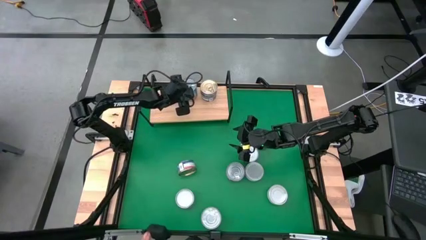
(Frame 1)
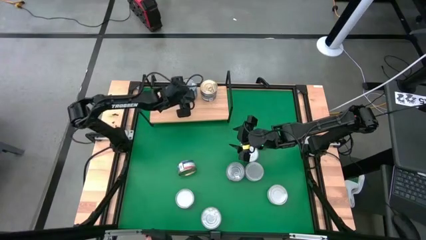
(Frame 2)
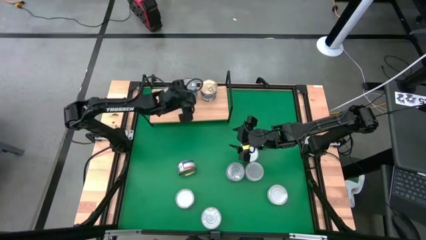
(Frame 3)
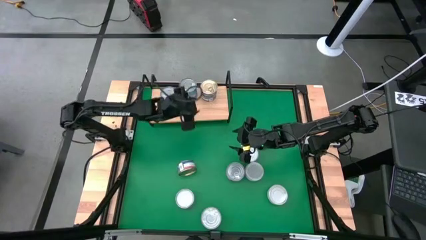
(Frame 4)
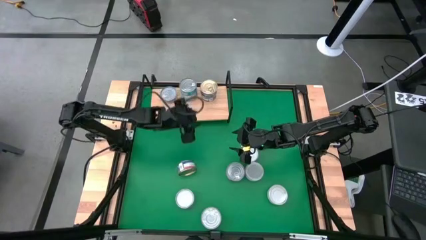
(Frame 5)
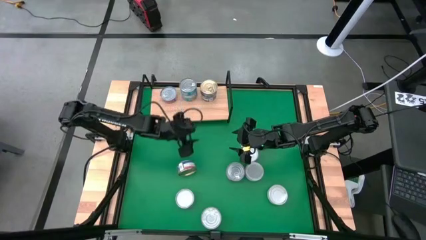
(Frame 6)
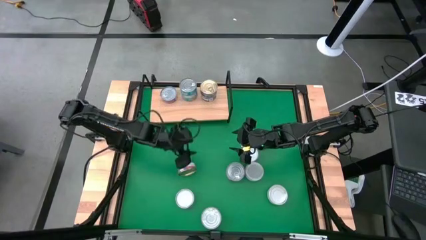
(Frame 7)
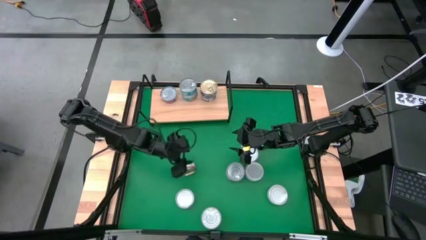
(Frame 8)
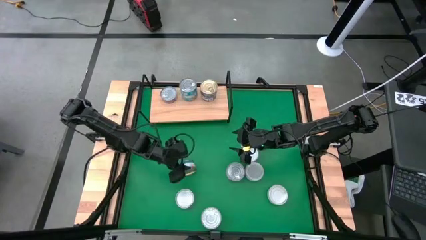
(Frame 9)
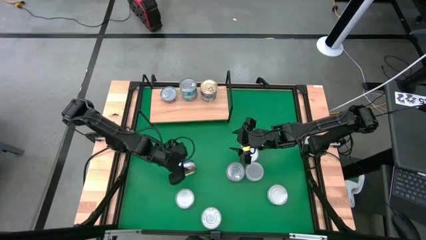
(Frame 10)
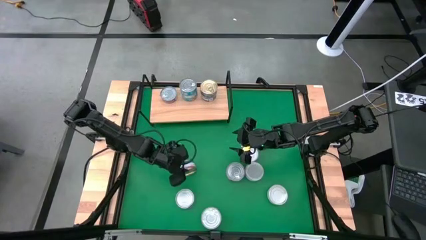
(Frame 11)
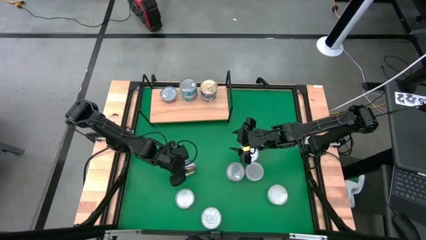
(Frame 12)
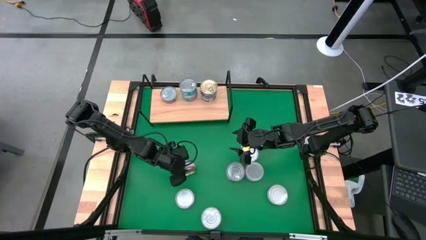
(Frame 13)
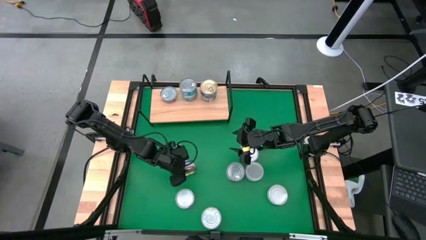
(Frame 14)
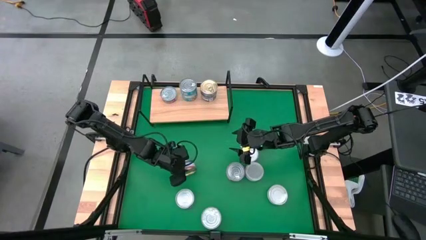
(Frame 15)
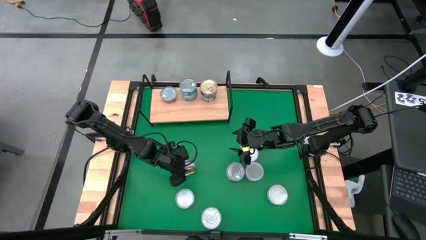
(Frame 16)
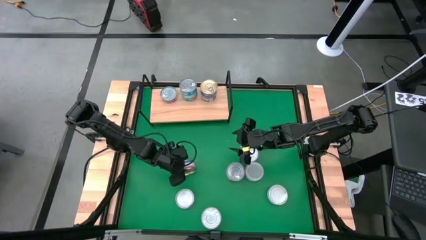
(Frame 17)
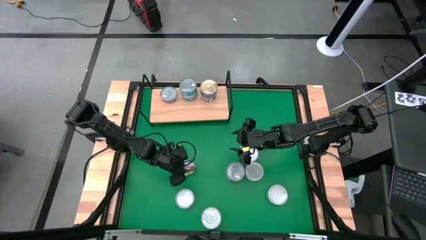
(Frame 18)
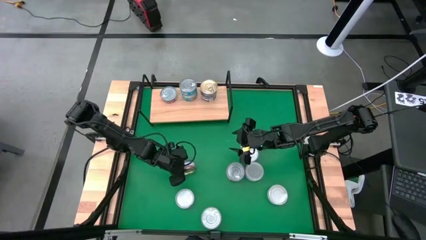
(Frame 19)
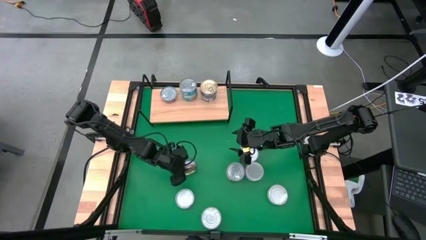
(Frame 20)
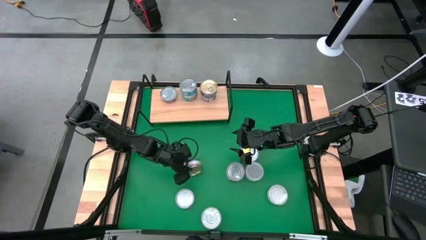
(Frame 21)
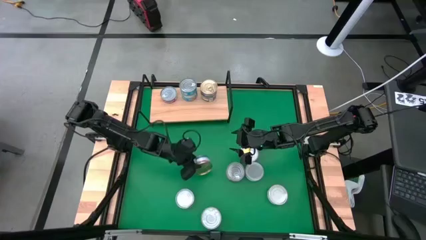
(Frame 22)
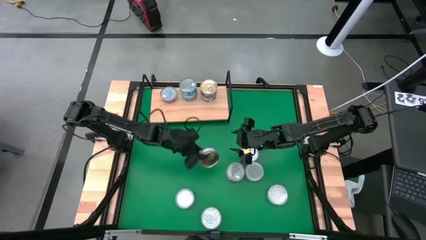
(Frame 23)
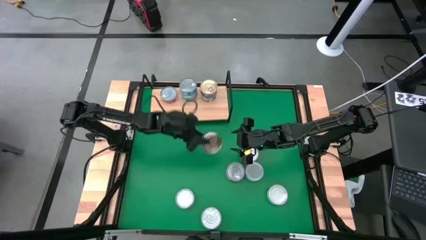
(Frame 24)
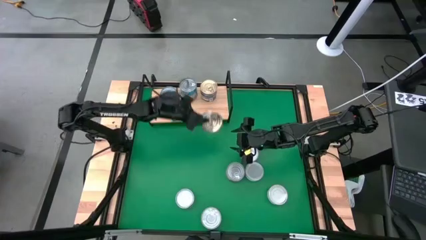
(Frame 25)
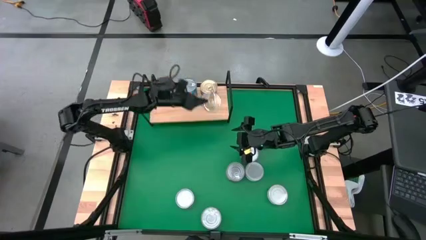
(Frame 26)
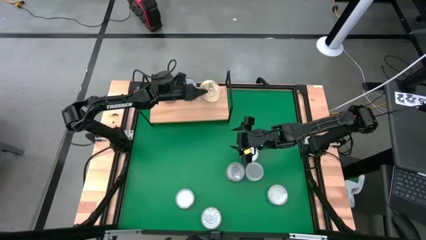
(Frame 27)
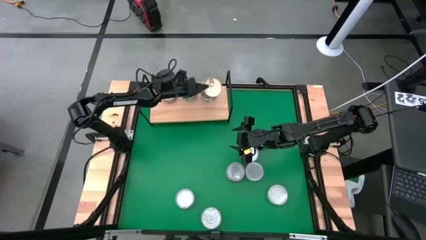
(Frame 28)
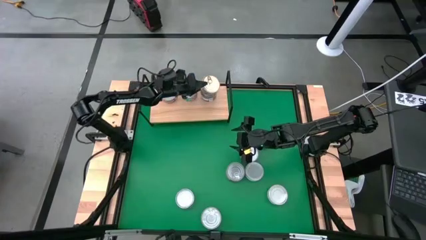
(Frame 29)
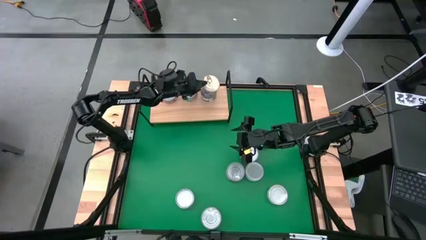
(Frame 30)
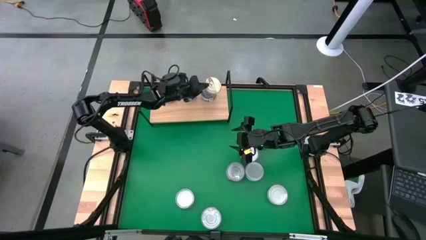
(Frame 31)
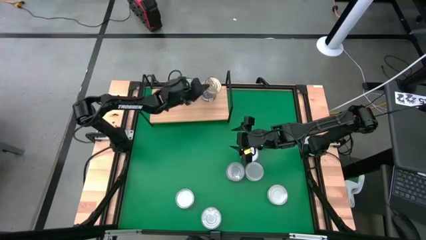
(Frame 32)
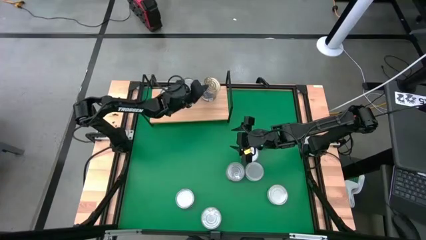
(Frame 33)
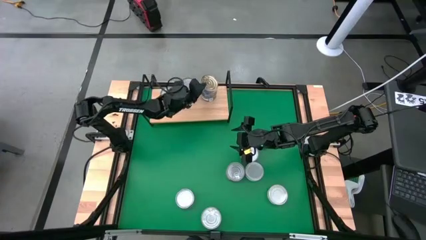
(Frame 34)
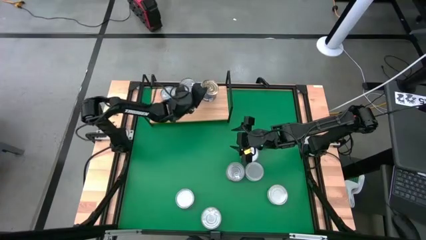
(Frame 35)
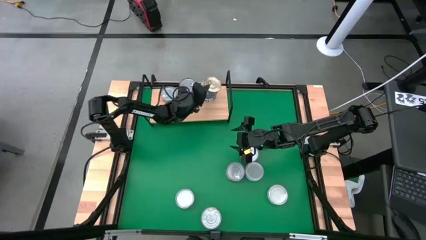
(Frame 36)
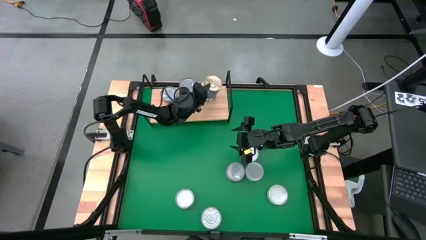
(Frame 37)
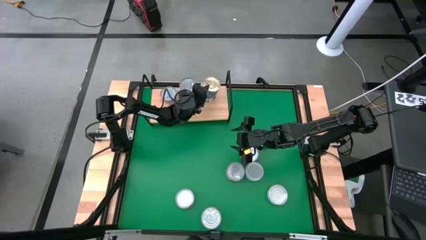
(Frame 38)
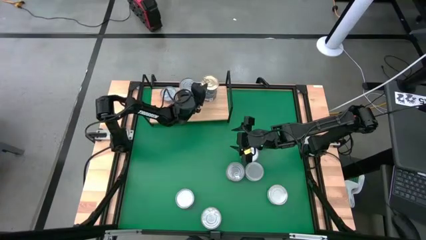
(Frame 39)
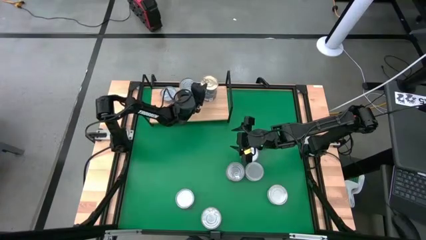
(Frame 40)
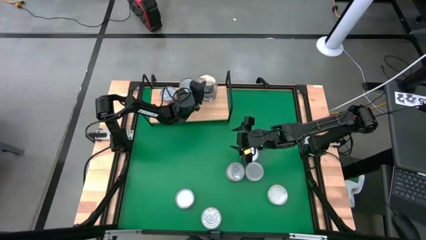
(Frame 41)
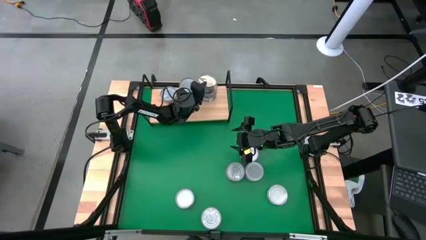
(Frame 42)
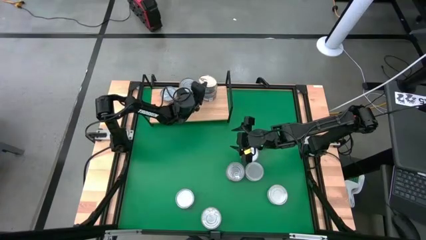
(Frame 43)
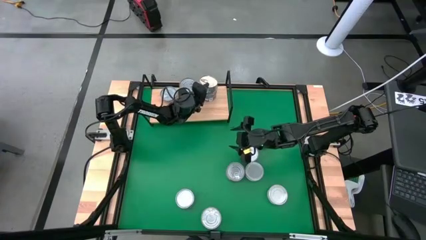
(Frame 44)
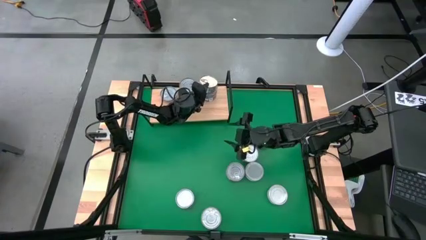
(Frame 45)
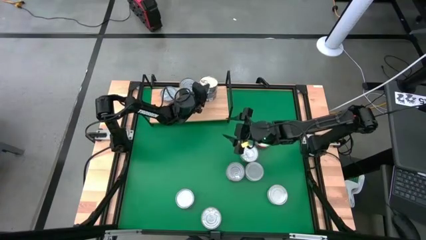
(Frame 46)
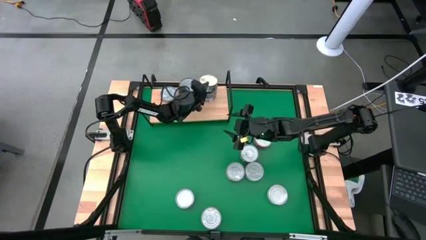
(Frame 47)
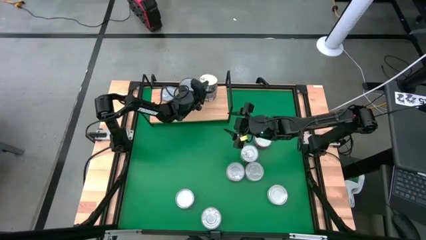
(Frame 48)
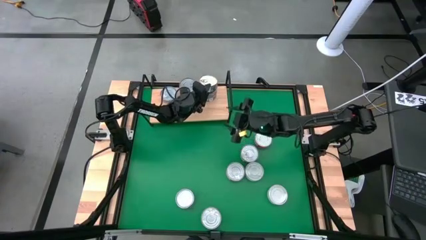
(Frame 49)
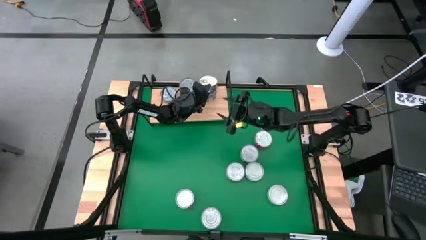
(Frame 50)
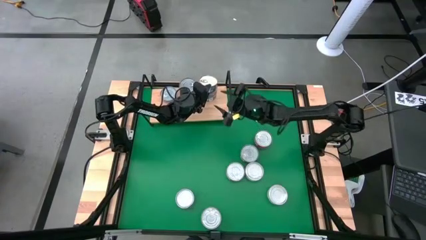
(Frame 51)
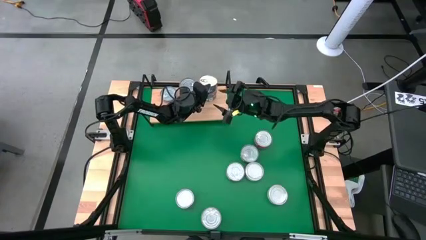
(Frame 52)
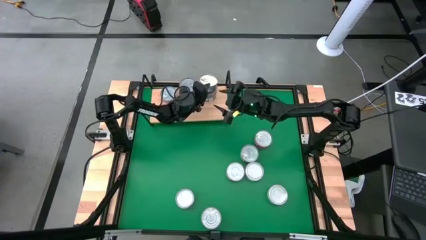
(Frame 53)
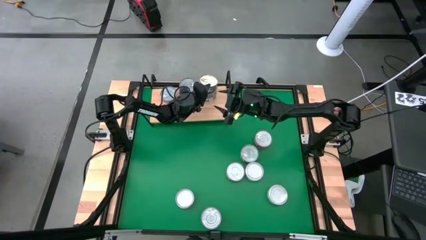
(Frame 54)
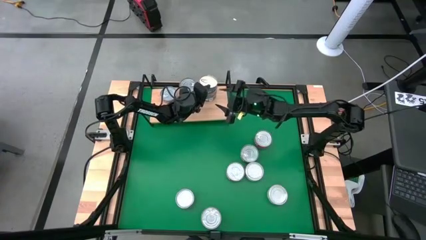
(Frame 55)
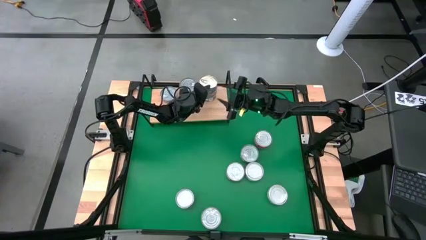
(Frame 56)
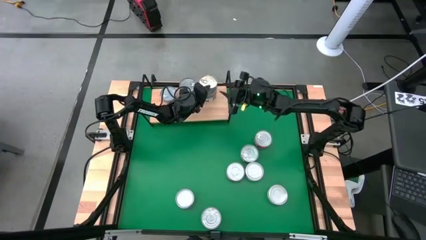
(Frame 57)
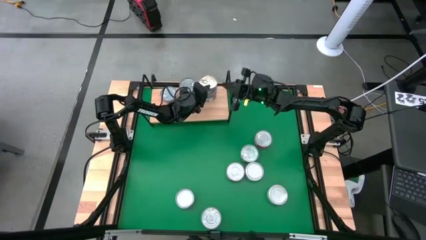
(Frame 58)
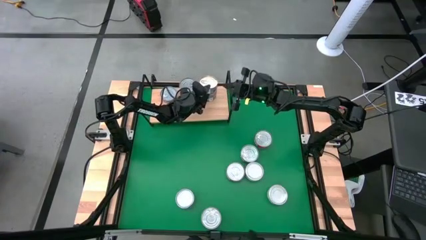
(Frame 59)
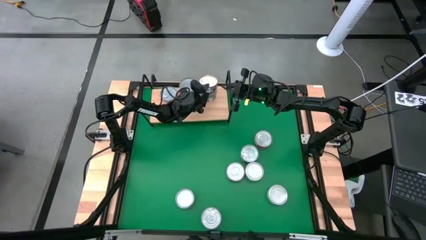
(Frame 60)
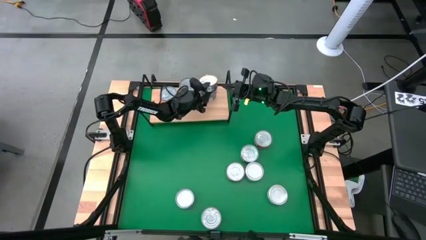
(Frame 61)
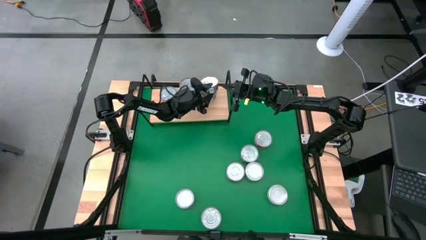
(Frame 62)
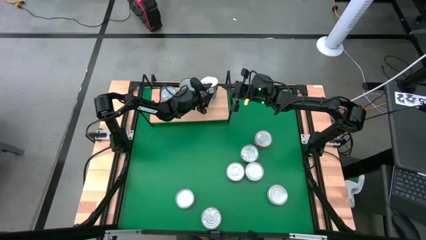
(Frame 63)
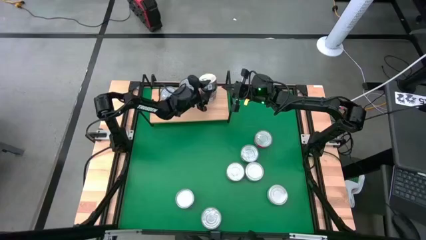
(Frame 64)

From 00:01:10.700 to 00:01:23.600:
Task: Stack canned seafood by type on shelf
Stack the blue pink tuna can on top of the other blue pink tuna cans on the shelf

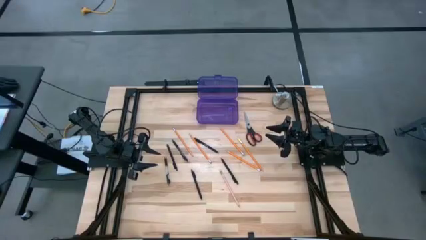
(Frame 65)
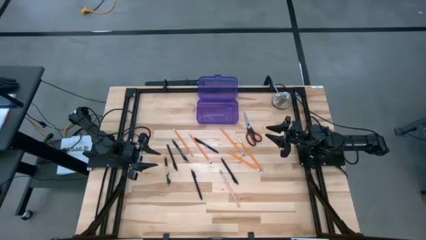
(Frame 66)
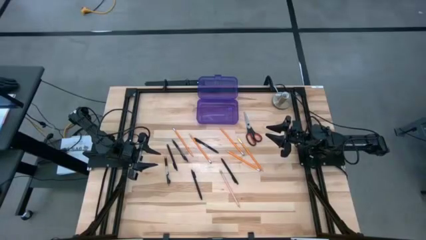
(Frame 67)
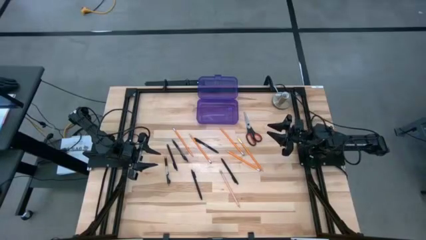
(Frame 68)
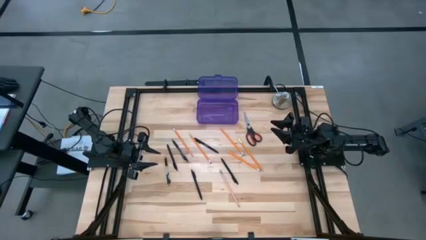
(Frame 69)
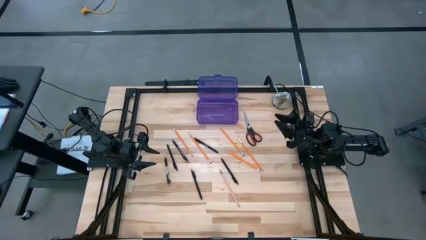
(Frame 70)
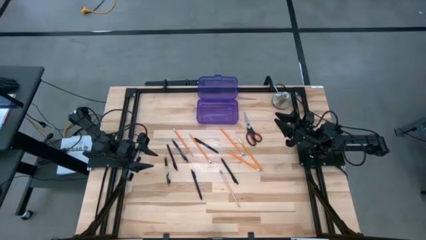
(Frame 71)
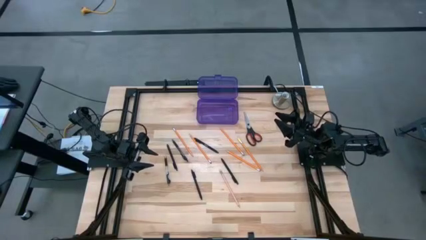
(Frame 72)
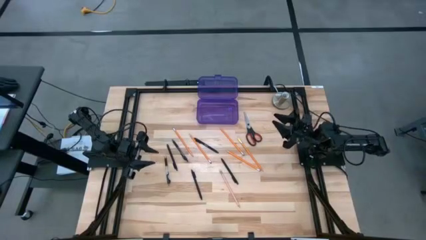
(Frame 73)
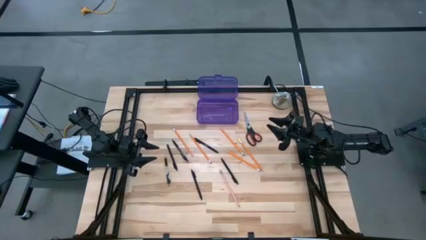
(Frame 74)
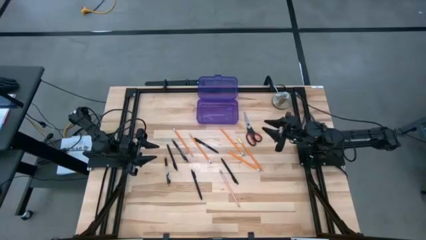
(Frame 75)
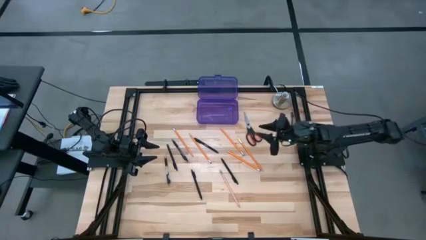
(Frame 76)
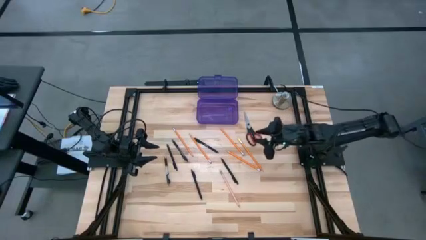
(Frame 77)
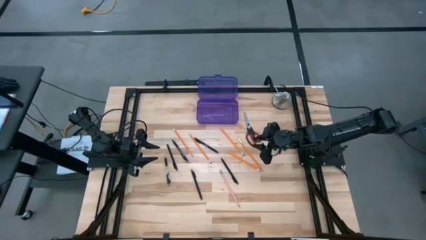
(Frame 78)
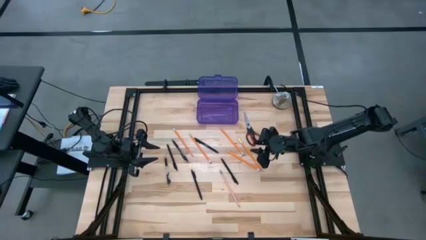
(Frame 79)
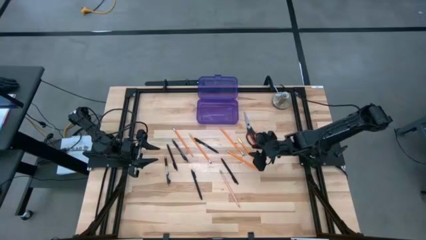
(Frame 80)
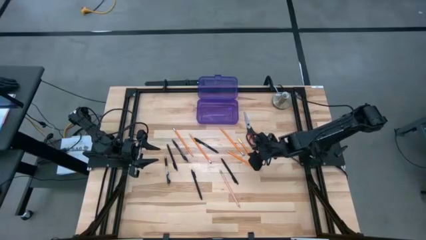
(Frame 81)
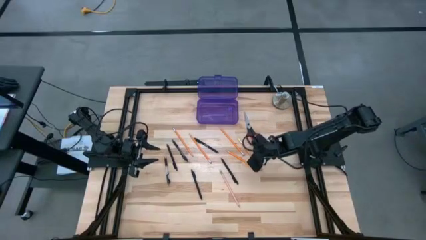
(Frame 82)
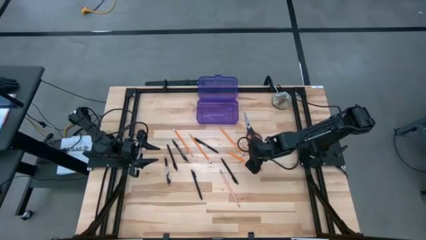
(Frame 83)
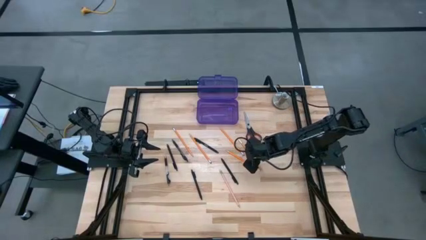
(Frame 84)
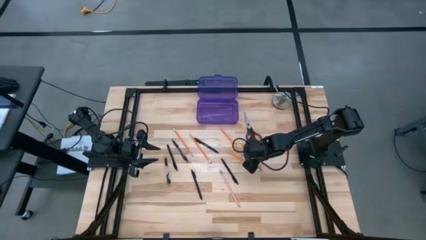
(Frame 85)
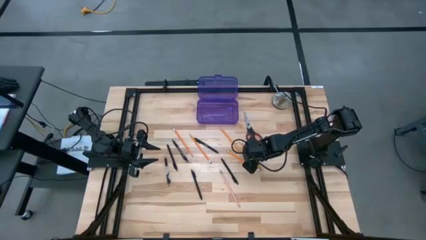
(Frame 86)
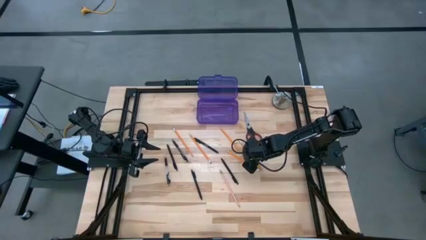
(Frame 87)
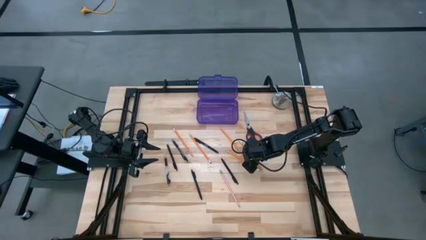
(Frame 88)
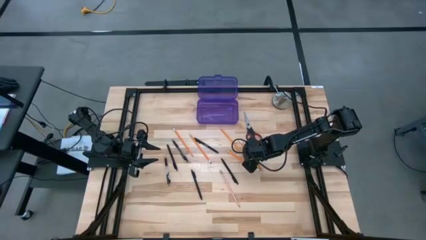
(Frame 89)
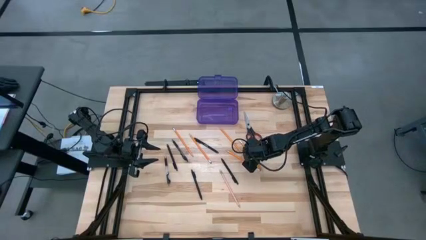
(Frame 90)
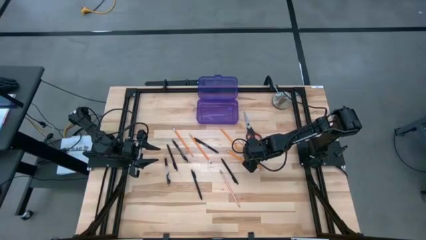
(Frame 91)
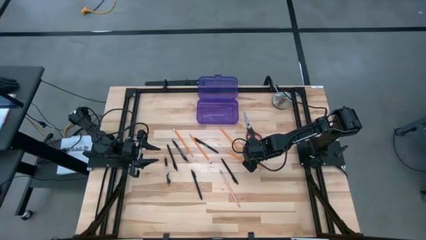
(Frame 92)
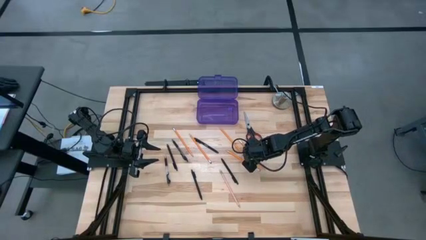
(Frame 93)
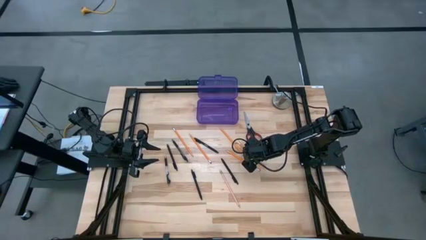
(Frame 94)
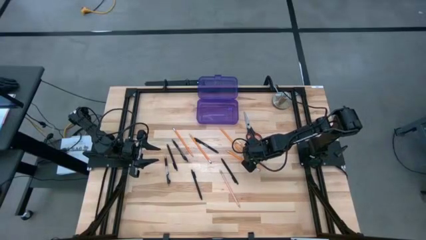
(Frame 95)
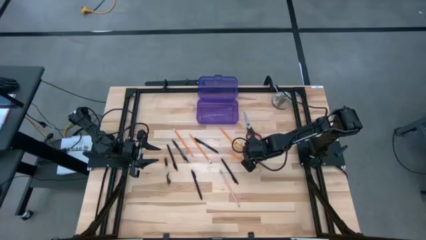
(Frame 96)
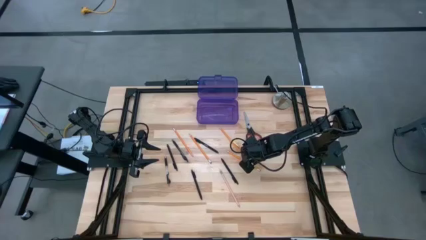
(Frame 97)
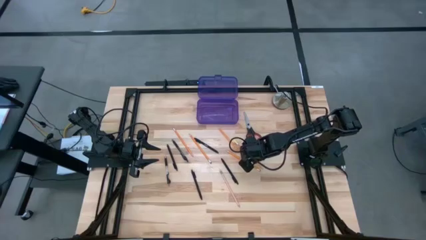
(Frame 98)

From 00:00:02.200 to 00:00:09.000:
Task: Pick & place school supplies into a supply box
Put the yellow pencil into the violet supply box
